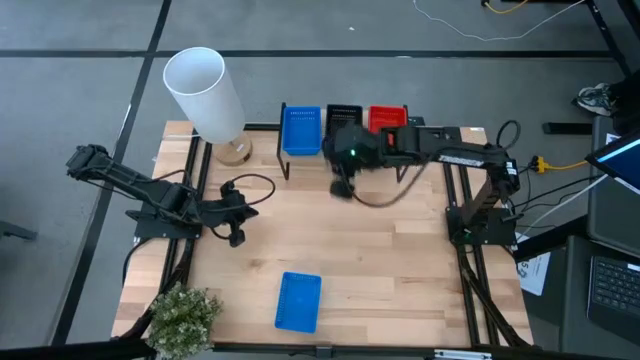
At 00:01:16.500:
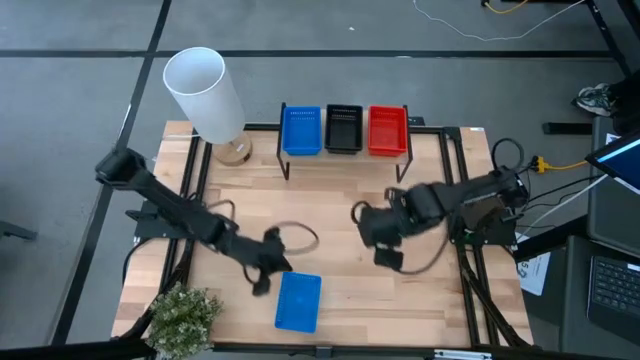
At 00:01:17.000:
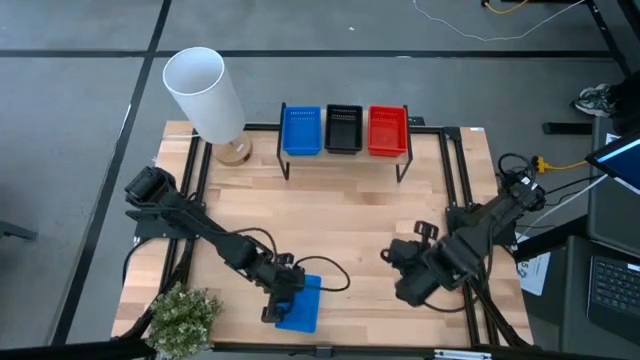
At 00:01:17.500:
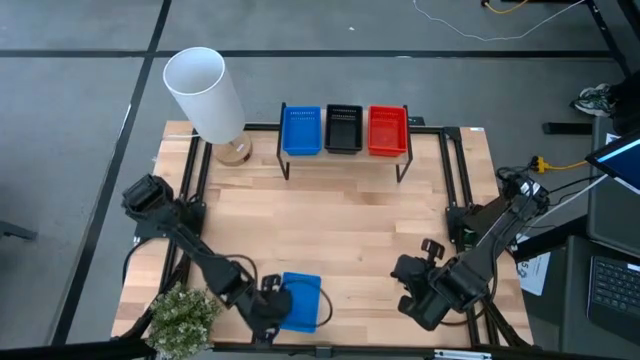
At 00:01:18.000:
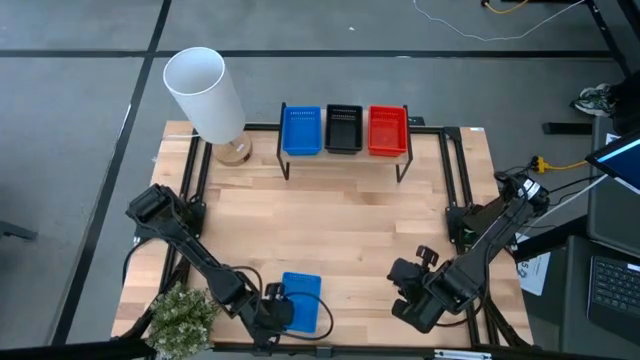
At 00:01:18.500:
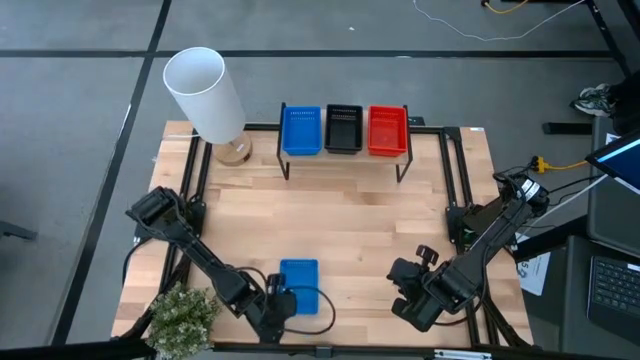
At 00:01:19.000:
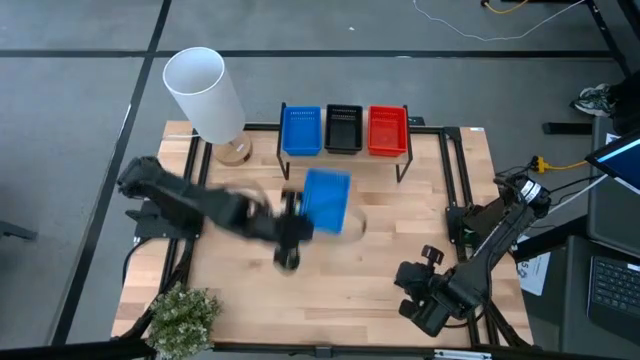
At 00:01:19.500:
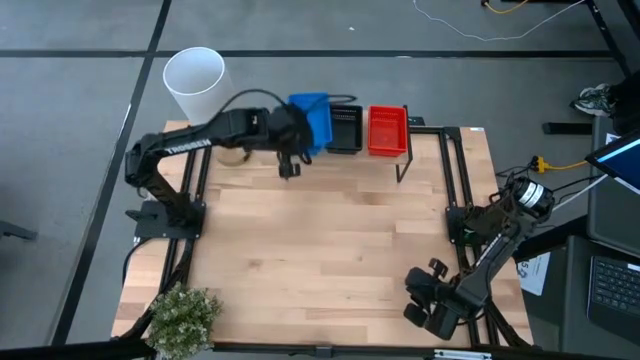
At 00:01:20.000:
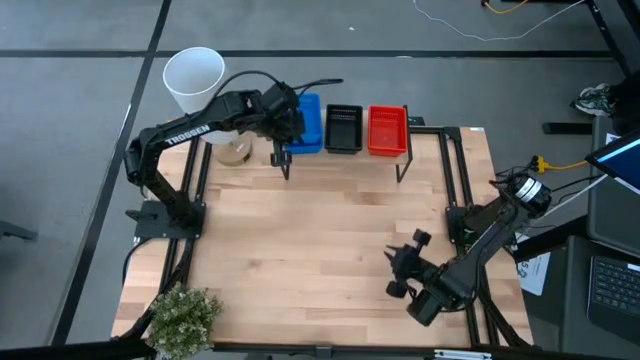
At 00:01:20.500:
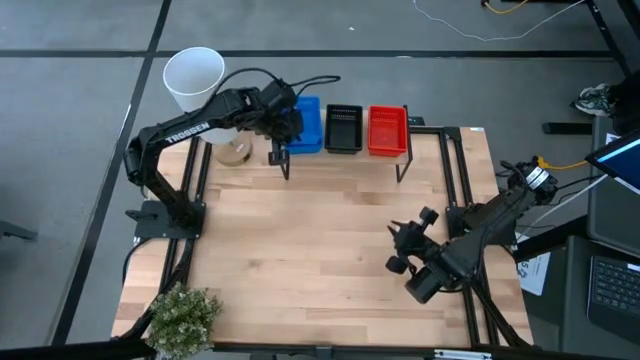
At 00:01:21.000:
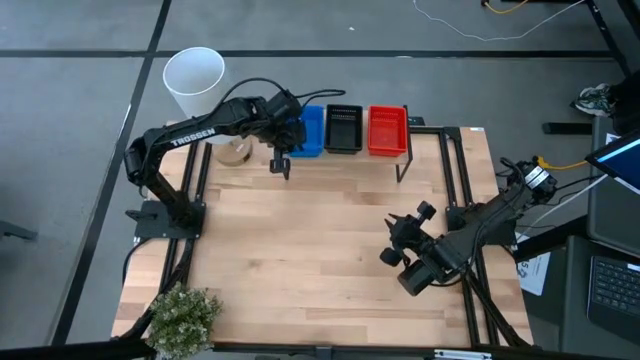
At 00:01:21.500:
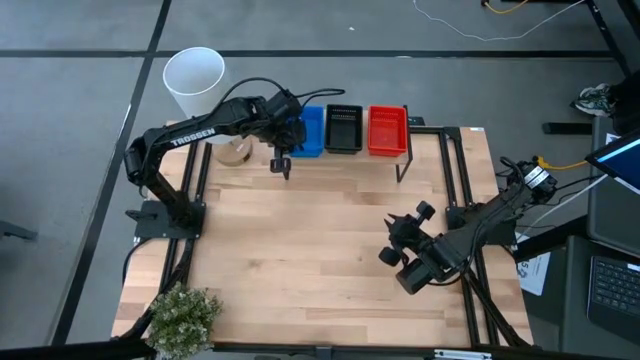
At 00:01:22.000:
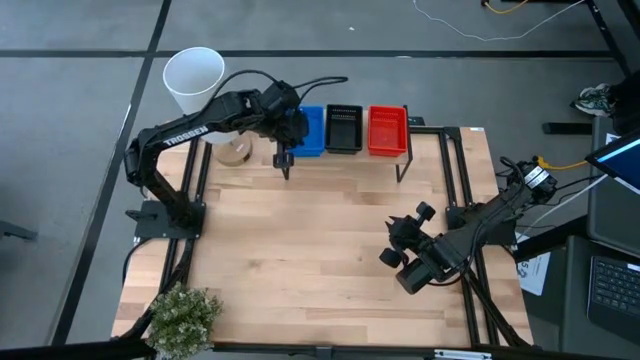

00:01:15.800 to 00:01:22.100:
Task: Stack baskets on shelf by color
Stack the blue bin on top of the other blue bins on the shelf

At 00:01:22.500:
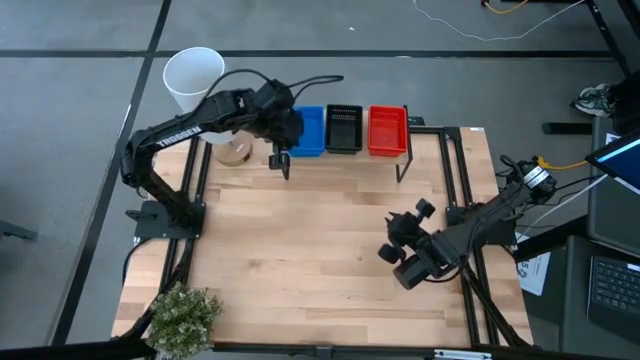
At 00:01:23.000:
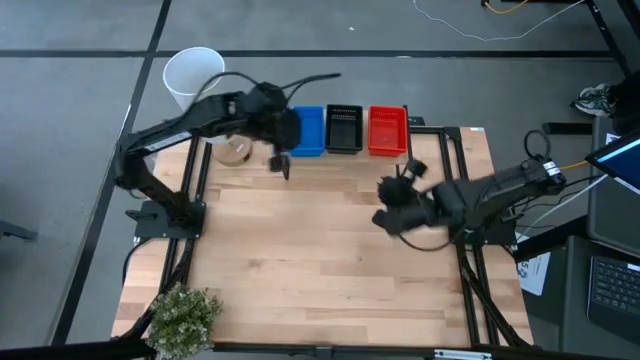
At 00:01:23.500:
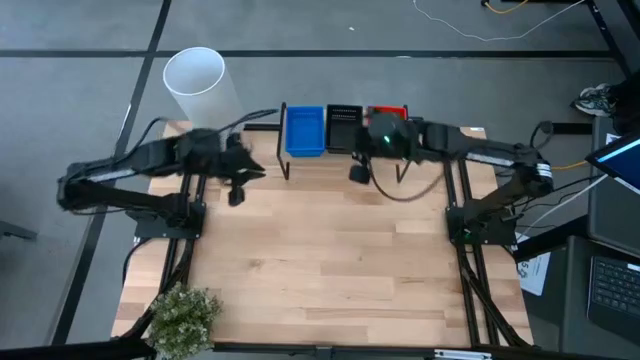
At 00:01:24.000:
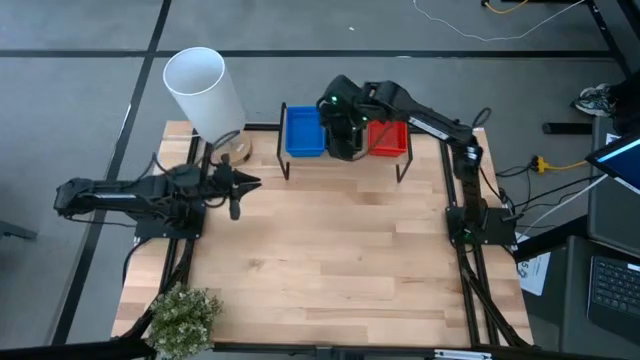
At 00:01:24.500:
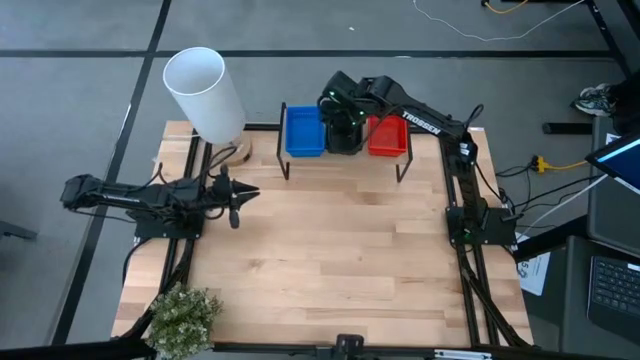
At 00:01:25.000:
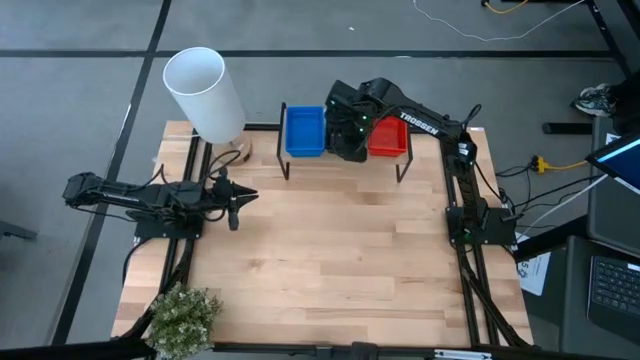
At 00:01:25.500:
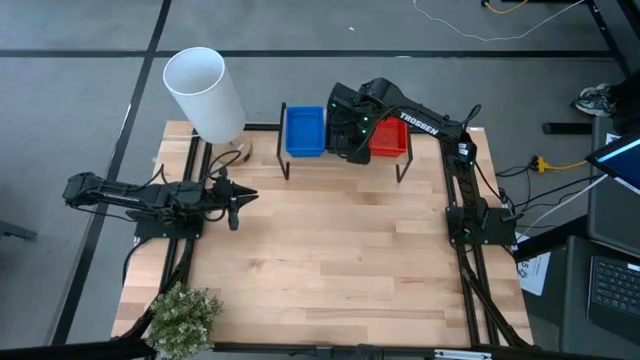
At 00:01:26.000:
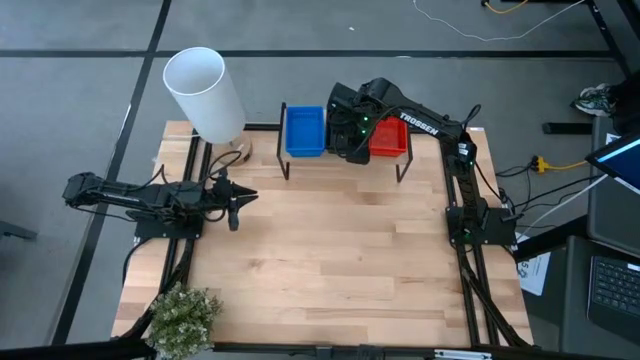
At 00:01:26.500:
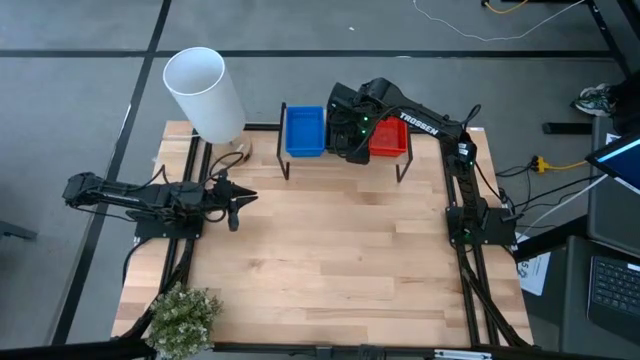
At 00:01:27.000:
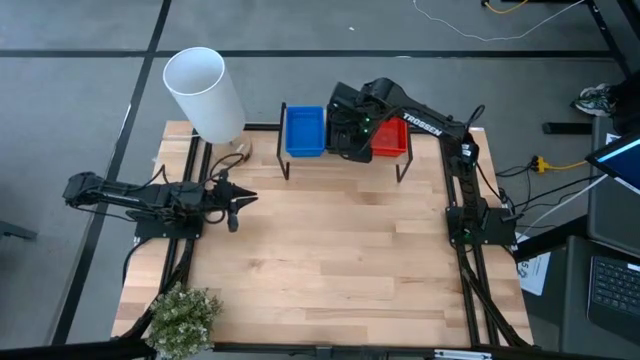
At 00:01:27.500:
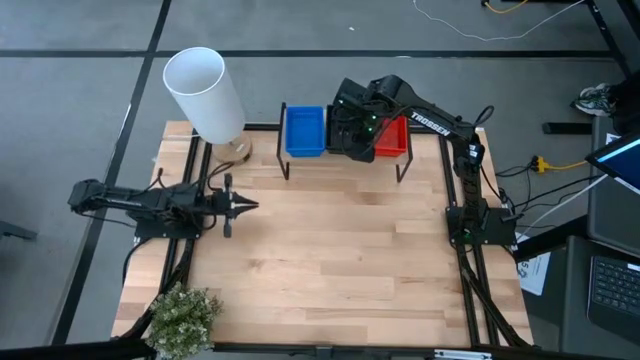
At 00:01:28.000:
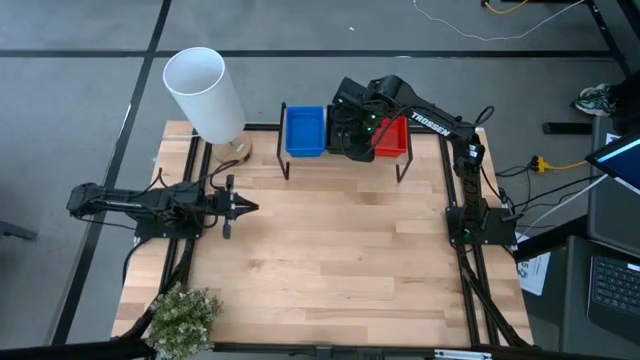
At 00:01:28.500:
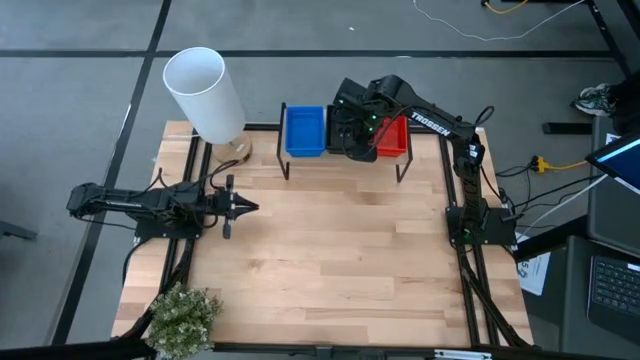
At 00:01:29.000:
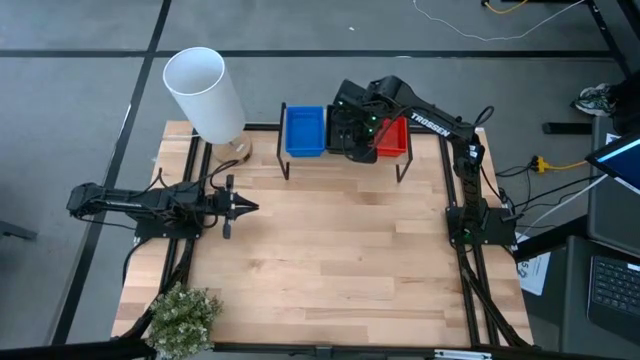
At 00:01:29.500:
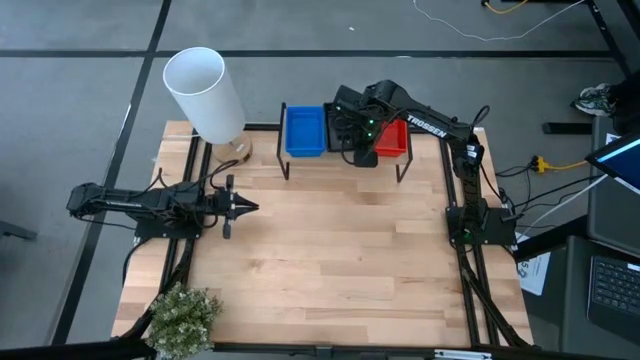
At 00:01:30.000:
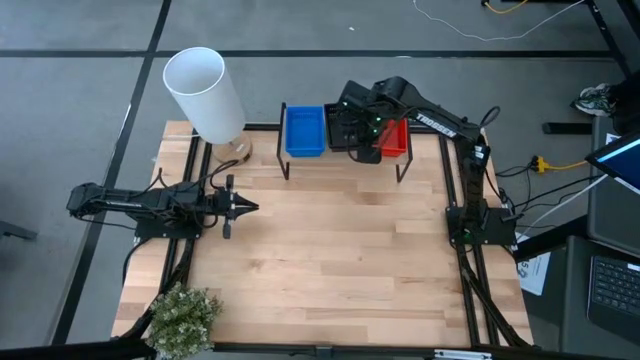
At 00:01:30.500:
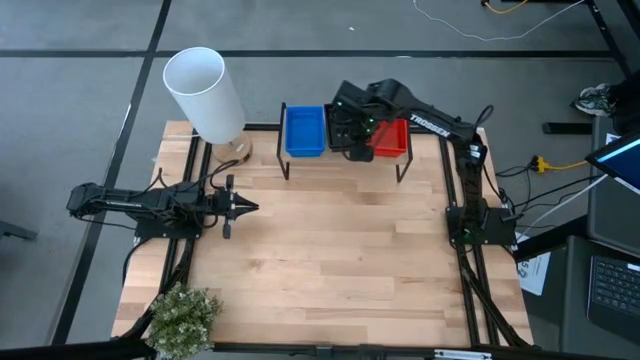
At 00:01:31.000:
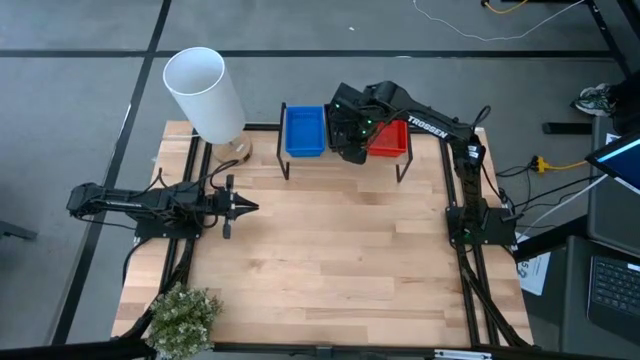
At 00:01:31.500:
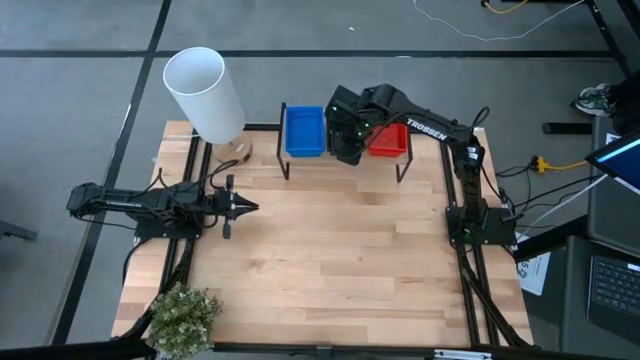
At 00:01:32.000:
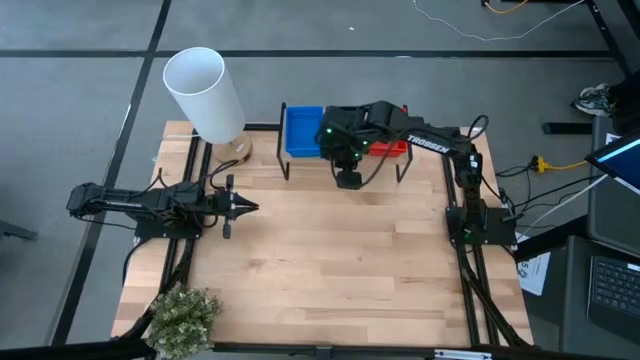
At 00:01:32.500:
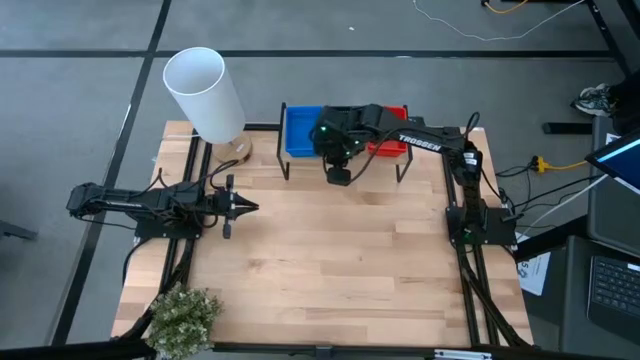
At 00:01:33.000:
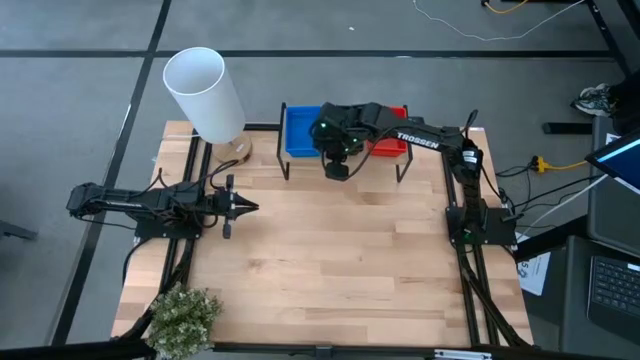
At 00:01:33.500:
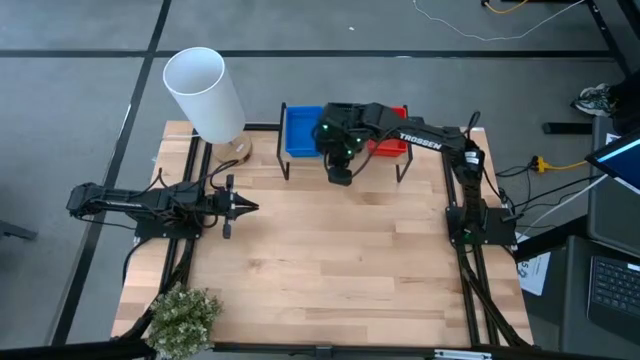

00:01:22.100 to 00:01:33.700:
Adjust the stacked black bins on the shelf

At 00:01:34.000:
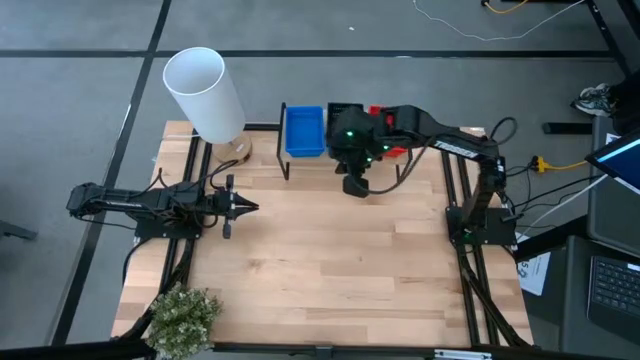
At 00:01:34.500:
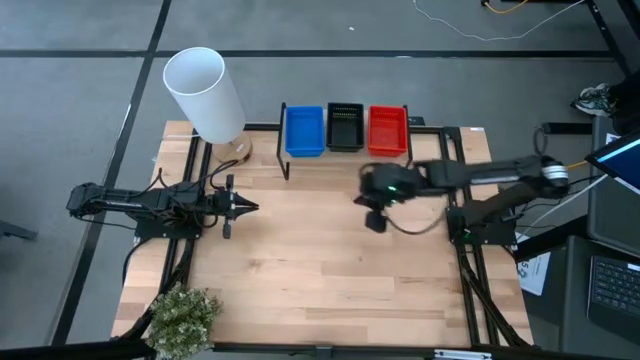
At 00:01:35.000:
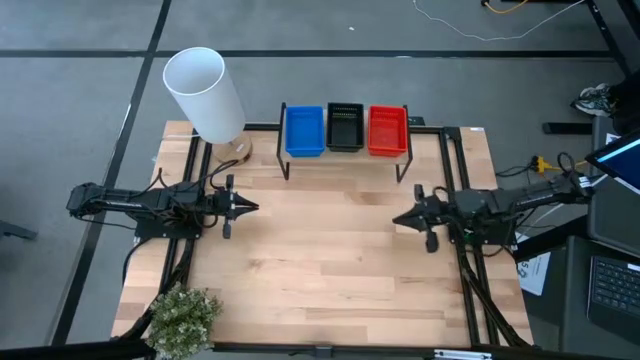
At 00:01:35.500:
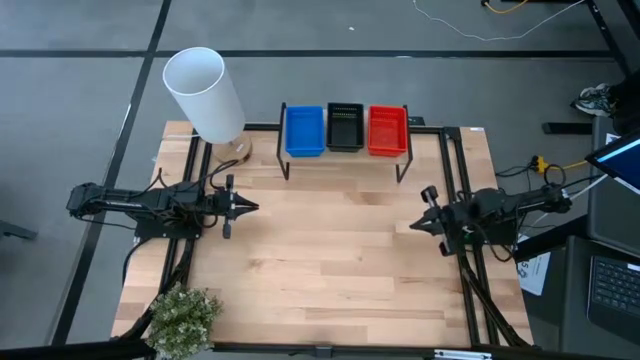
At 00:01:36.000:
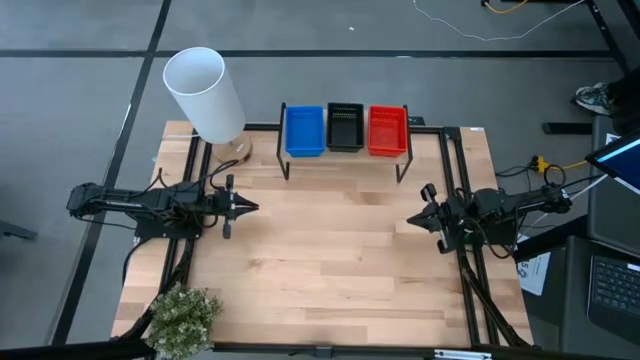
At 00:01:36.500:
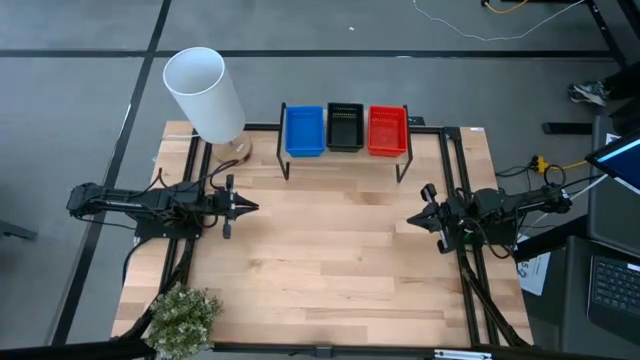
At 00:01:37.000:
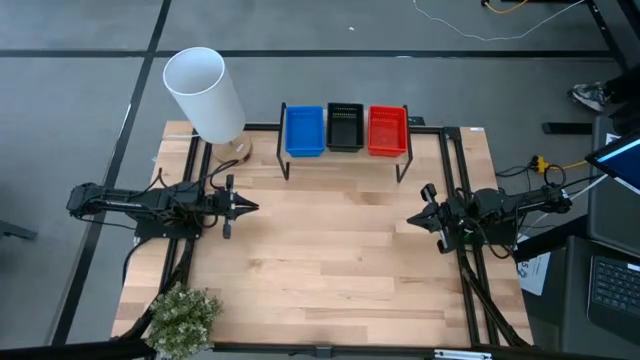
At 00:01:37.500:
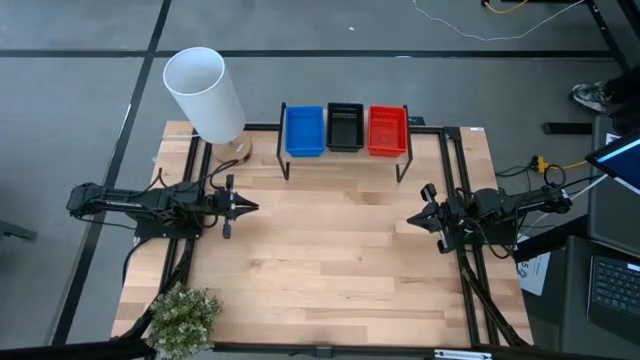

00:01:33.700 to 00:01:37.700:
Return to Home Position
